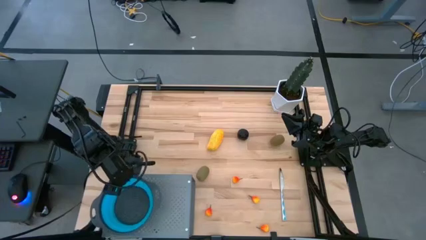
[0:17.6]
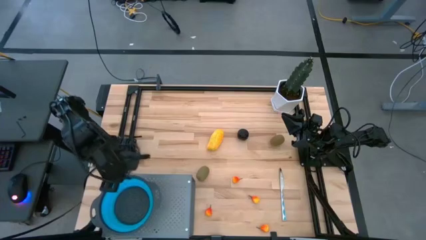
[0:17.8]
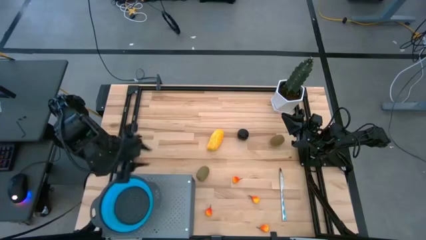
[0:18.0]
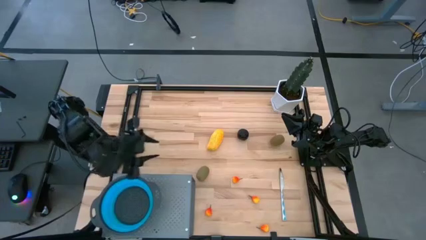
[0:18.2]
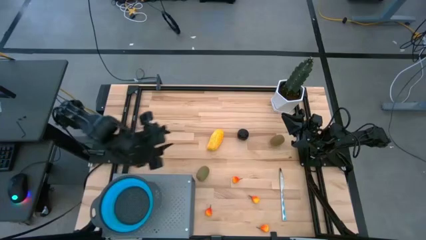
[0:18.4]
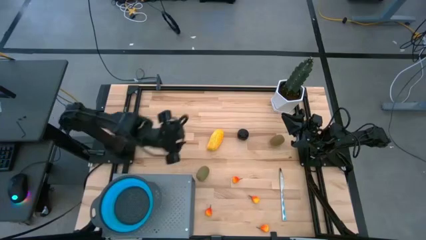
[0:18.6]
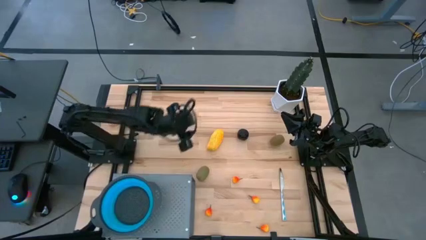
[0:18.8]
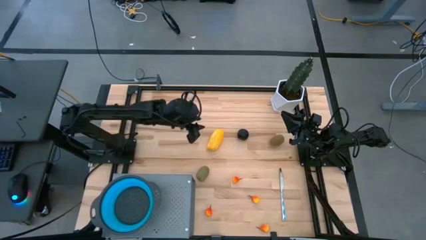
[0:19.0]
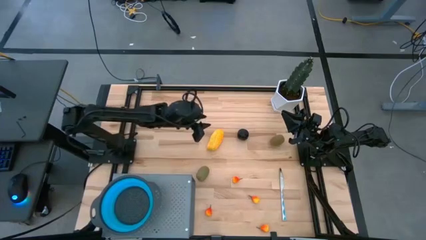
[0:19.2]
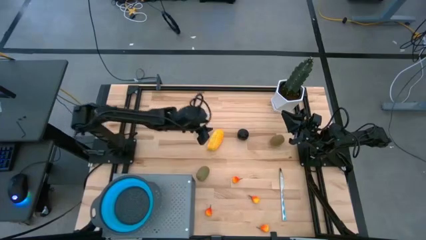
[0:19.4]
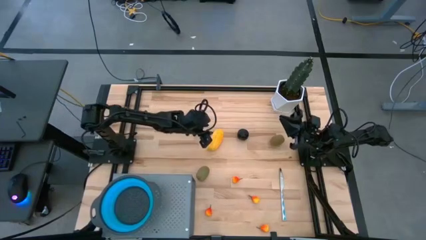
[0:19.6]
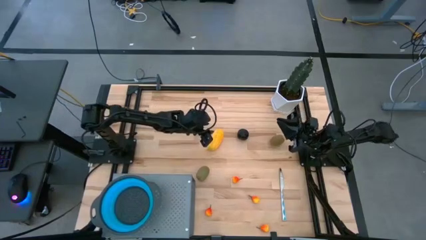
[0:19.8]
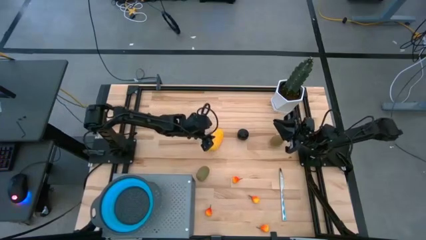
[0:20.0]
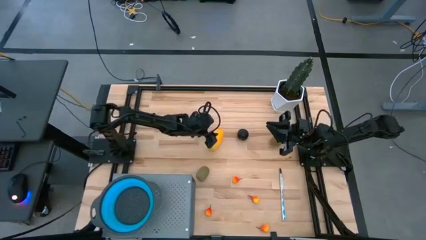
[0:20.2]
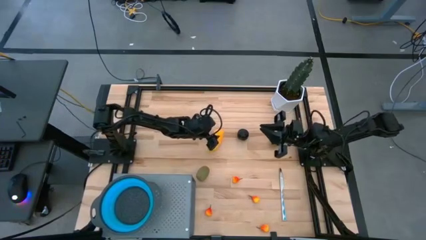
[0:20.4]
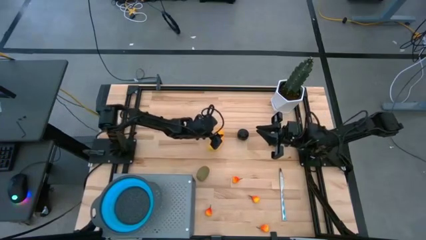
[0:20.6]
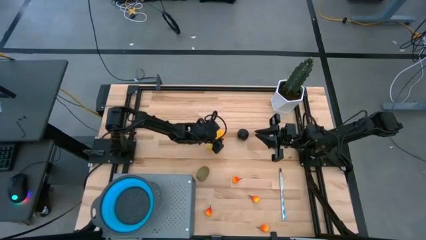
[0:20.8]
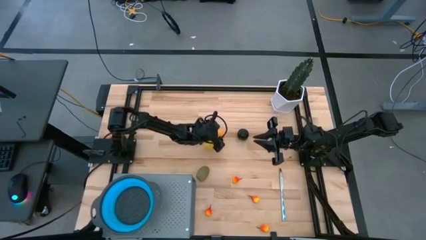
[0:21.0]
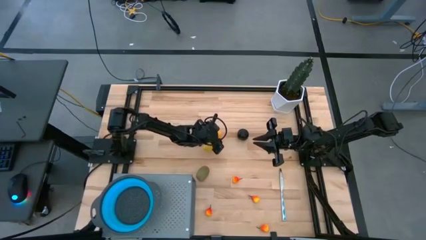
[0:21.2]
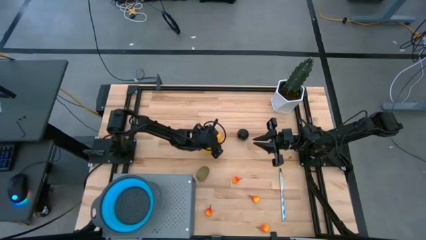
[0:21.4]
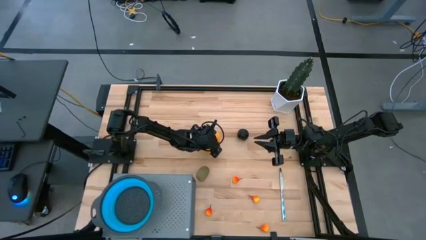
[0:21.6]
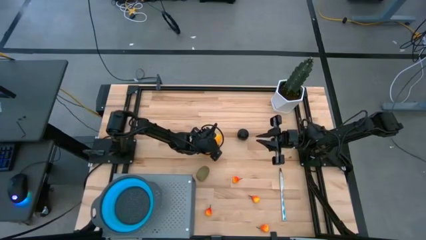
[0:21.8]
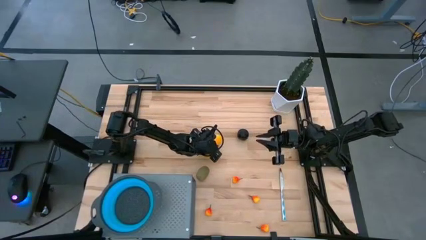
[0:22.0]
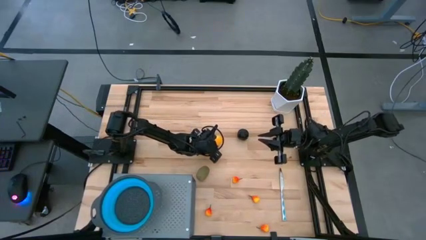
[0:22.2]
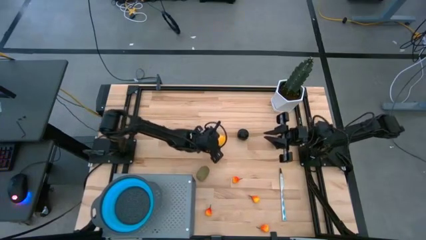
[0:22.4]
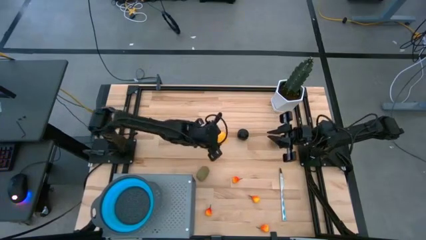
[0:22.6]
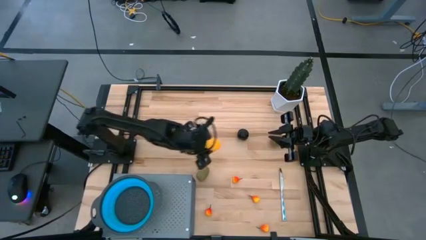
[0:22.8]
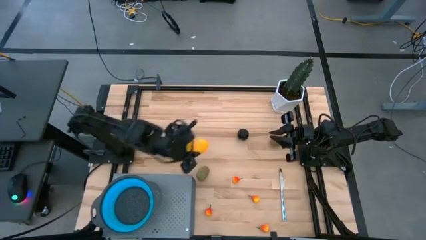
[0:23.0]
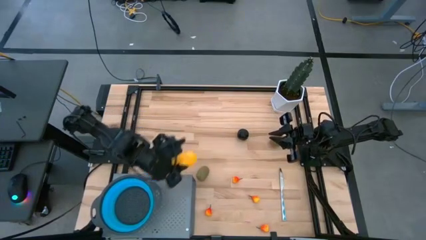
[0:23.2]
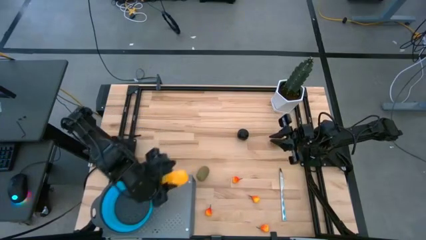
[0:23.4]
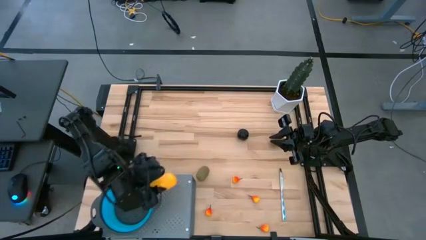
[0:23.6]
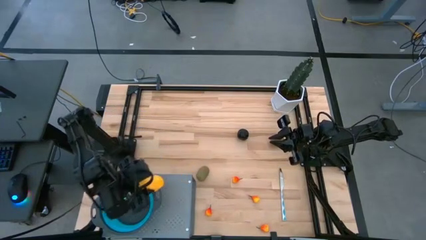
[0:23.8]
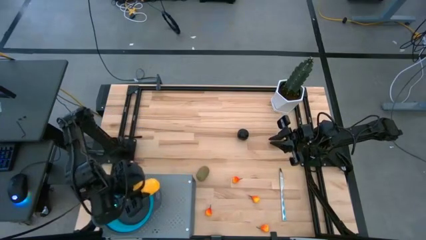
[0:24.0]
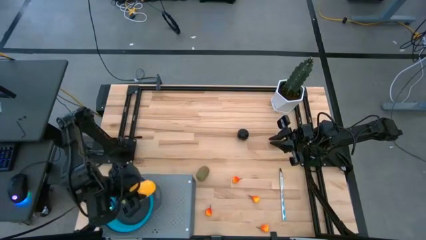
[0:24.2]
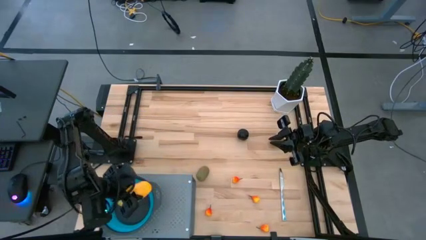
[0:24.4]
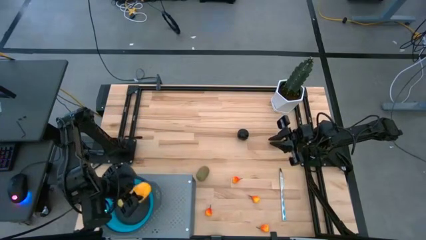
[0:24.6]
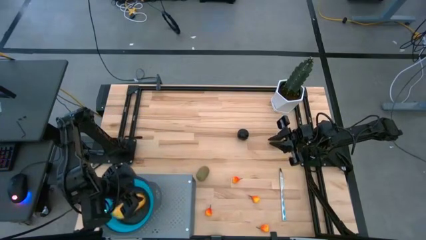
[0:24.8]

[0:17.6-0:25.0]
Task: Pick & Place Fruit
Put the mango into the strainer bowl

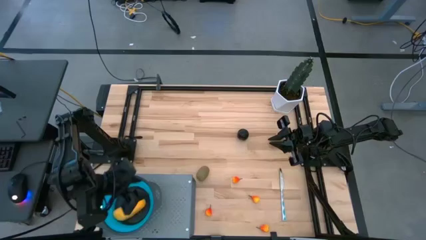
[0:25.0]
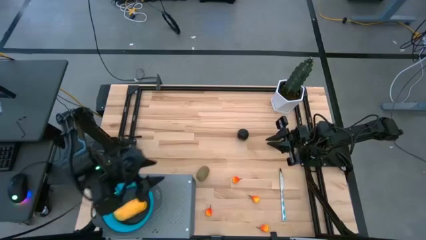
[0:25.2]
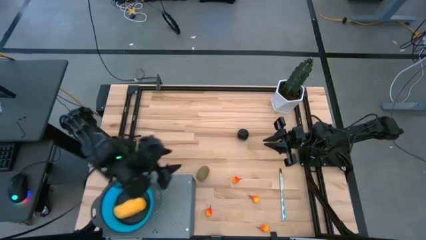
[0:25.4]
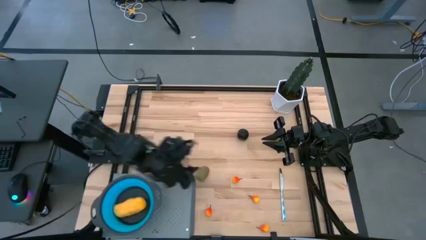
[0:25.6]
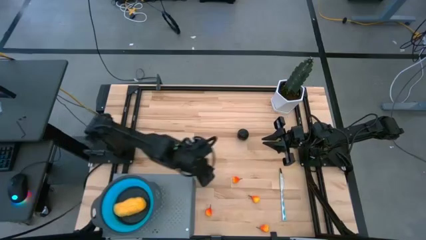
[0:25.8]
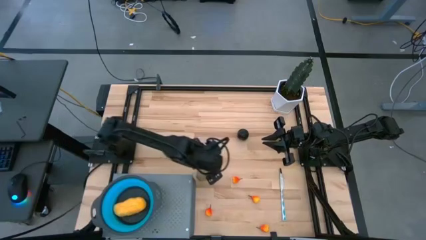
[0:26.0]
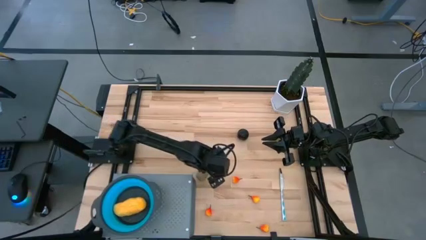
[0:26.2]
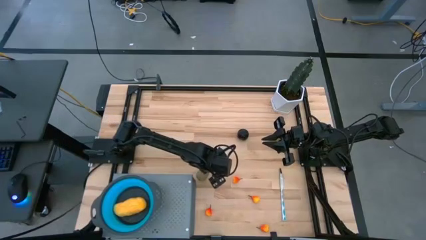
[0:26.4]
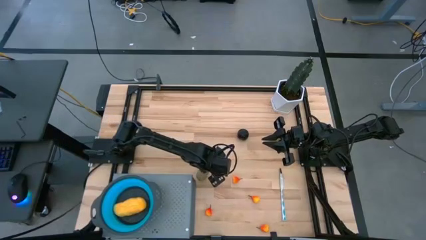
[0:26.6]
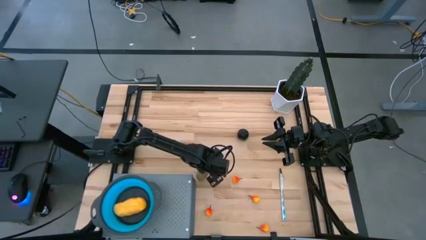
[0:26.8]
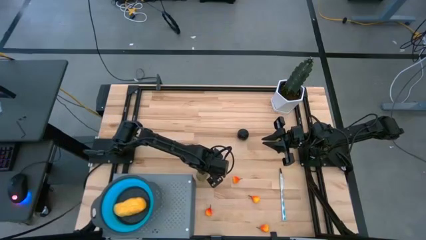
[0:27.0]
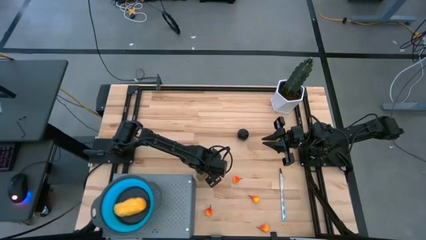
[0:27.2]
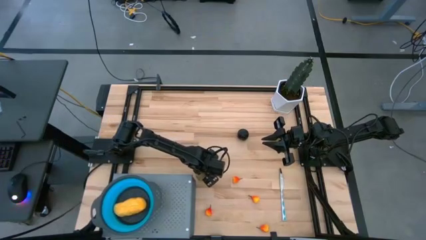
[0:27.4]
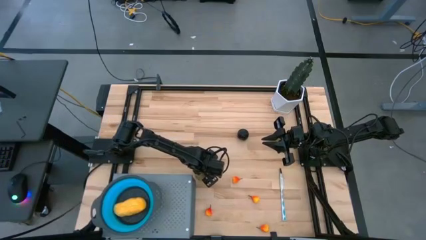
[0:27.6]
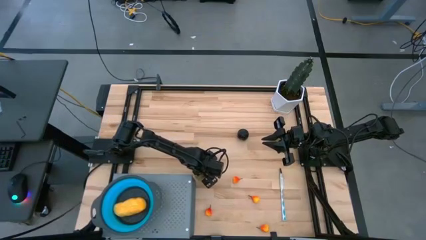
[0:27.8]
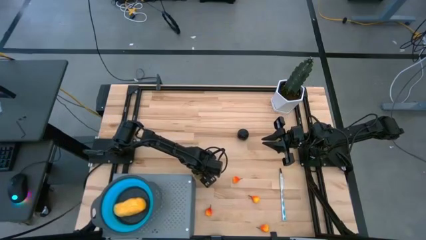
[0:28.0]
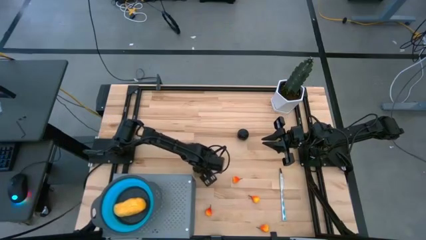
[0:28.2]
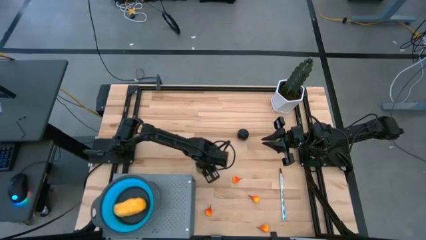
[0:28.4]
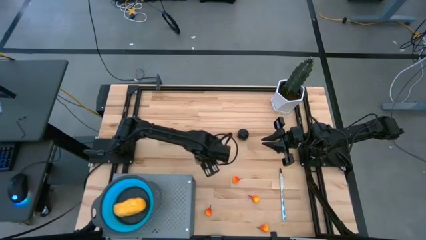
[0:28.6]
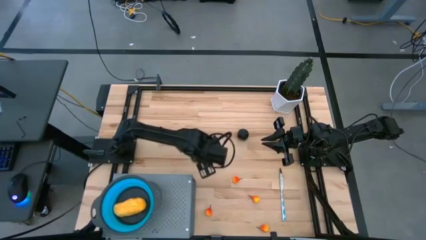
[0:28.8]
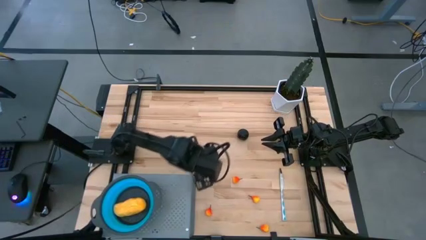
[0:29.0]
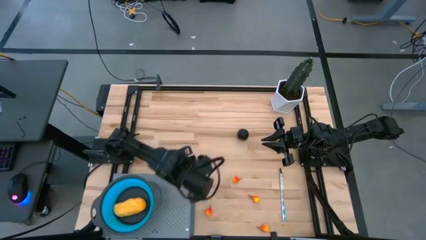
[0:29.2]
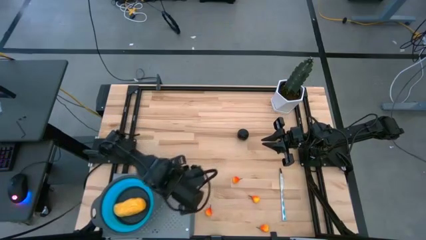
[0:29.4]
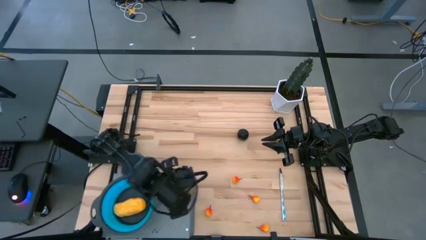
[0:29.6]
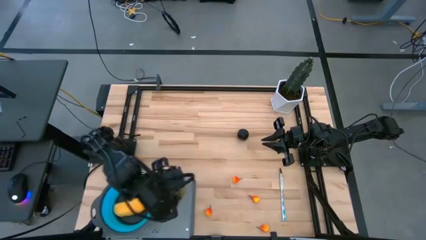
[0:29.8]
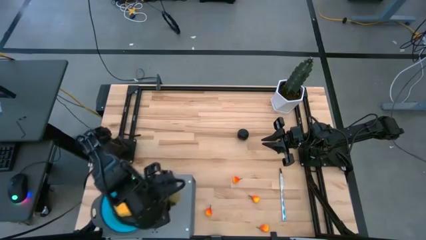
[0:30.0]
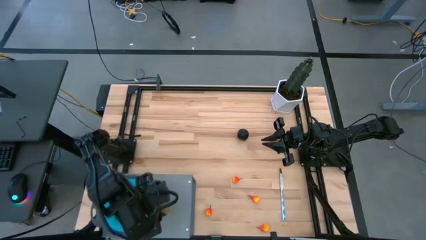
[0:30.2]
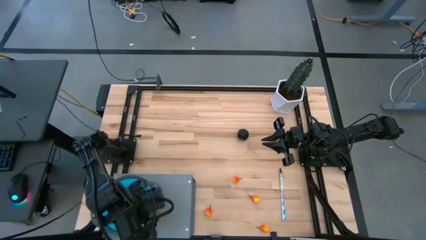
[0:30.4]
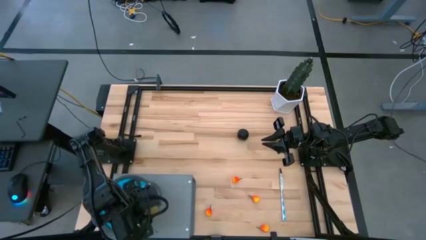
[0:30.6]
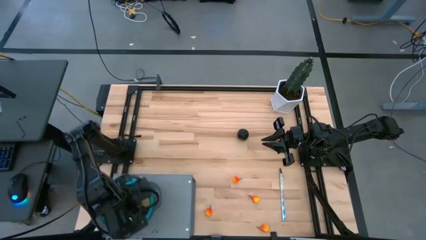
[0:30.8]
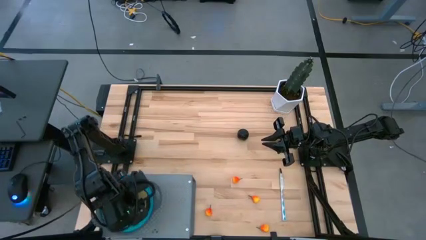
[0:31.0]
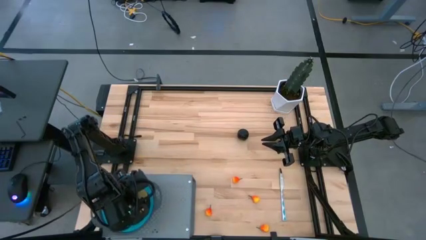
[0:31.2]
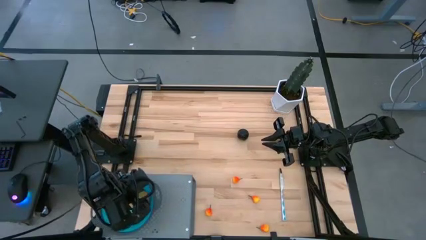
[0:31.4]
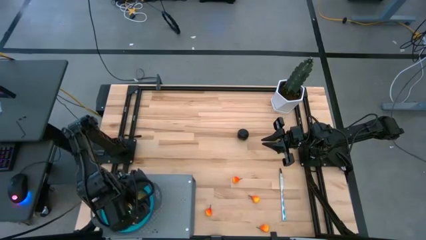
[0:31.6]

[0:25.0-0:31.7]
Put the left kiwi into the strainer bowl
